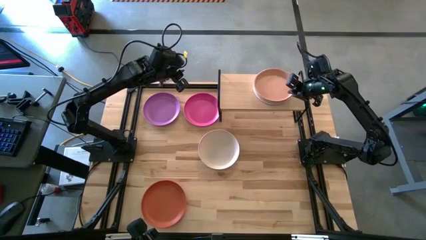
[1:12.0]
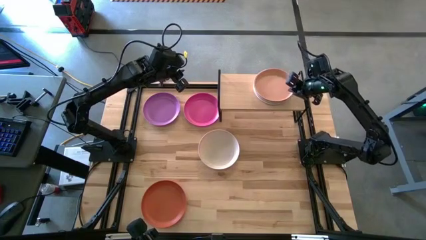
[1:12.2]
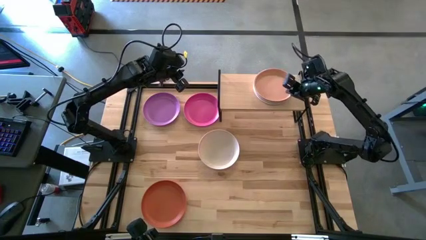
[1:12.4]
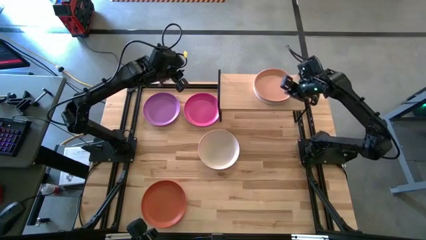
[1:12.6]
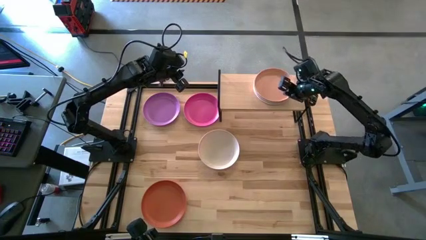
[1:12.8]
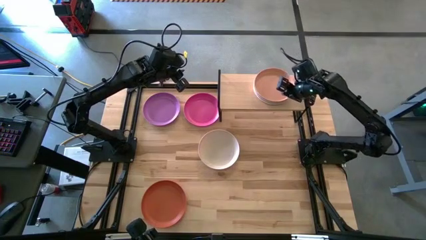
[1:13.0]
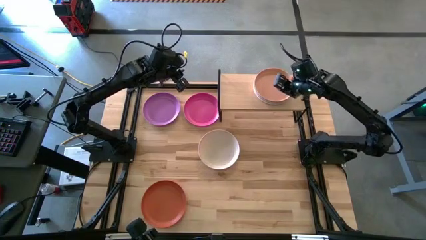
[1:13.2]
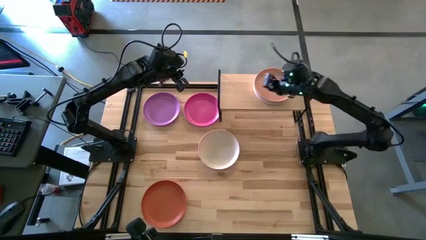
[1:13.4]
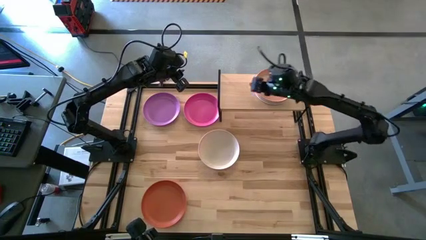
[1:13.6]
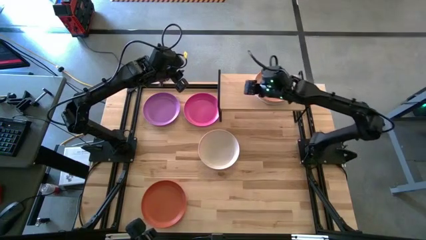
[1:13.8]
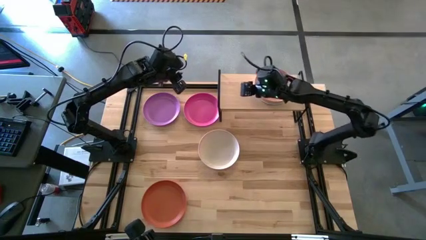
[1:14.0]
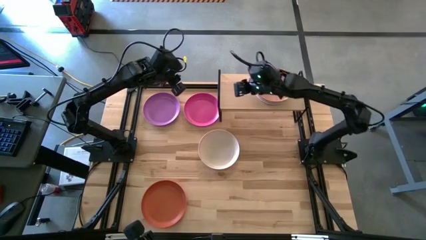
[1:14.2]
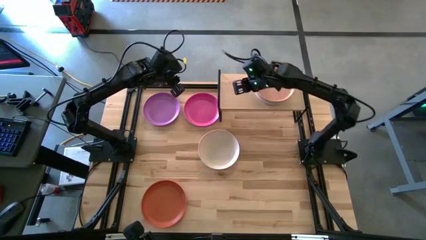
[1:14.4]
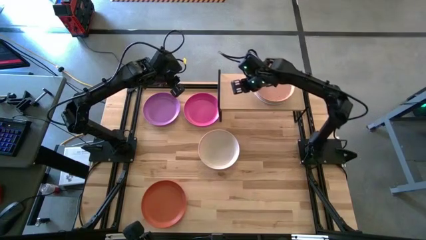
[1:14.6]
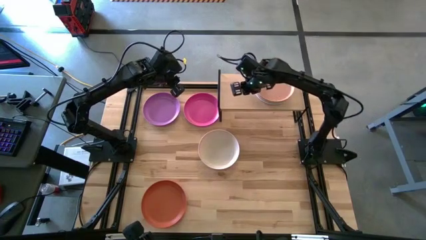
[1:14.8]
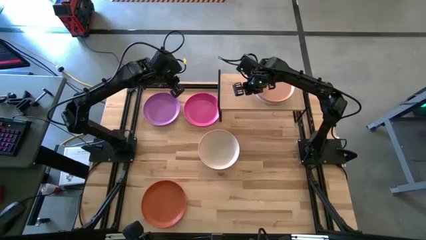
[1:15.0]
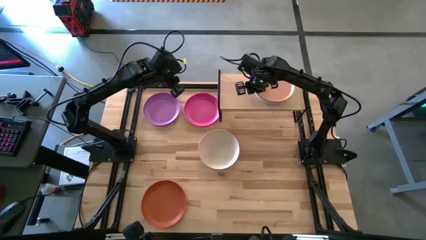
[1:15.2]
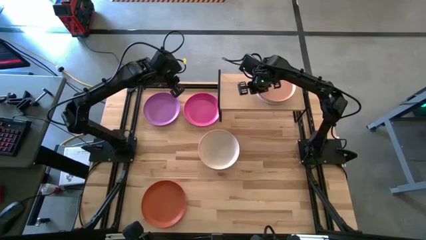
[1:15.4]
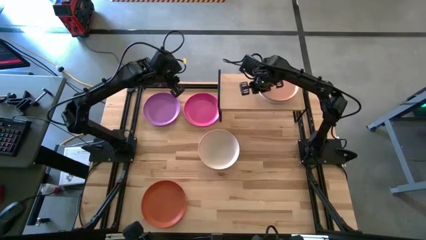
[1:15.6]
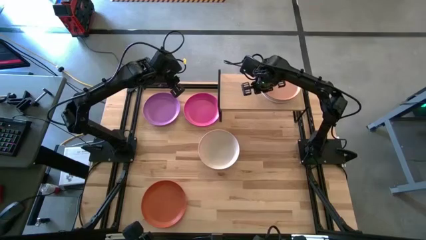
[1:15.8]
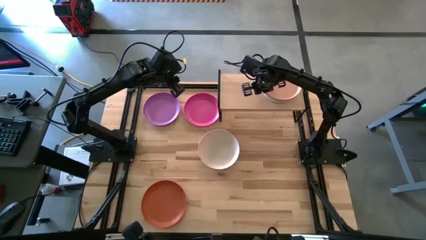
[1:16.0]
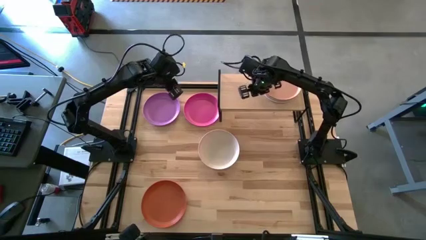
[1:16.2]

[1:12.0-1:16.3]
Task: Place and stack plates onto a shelf
Adjust the plates

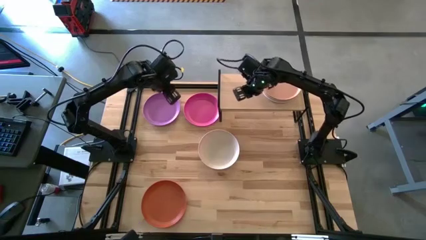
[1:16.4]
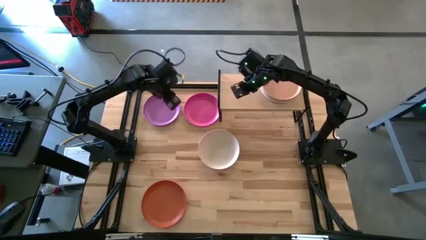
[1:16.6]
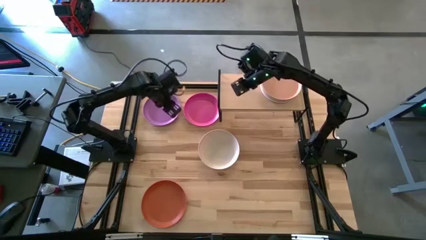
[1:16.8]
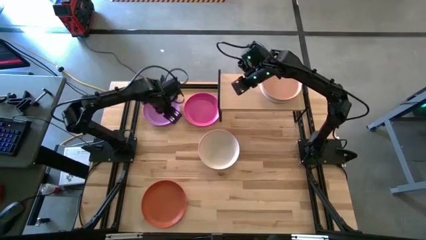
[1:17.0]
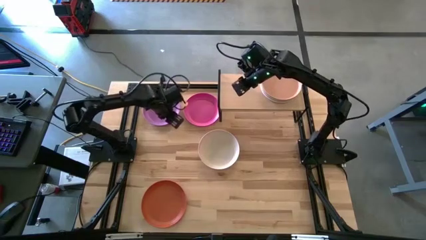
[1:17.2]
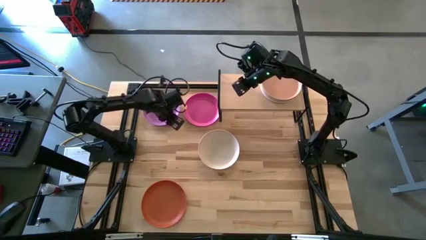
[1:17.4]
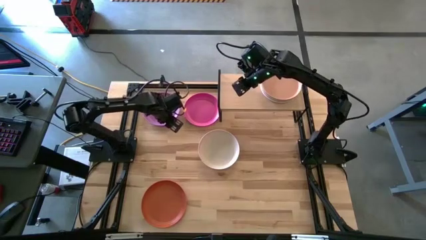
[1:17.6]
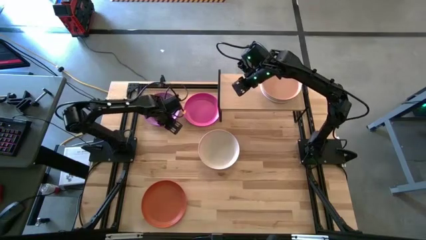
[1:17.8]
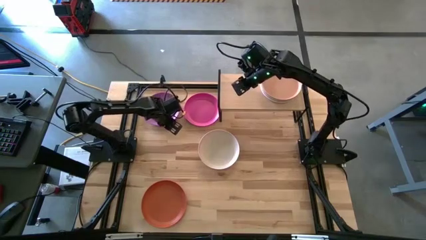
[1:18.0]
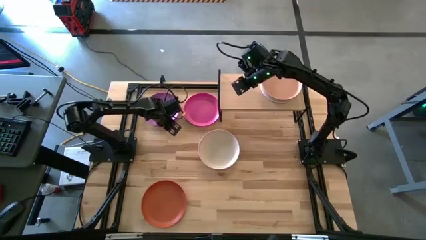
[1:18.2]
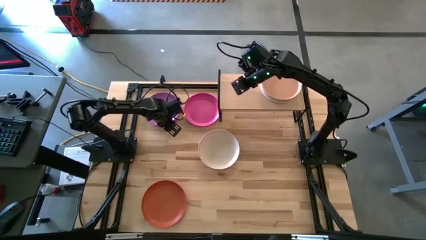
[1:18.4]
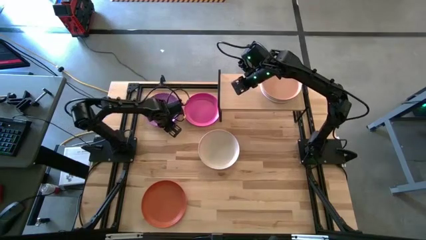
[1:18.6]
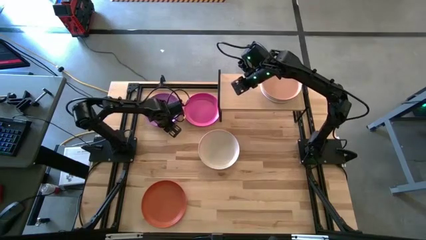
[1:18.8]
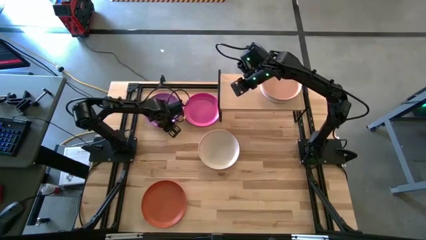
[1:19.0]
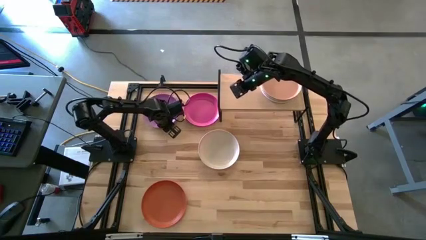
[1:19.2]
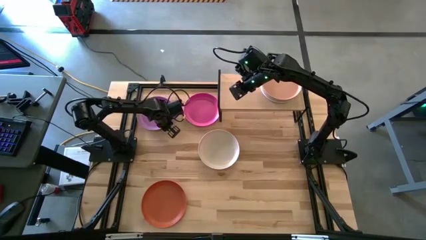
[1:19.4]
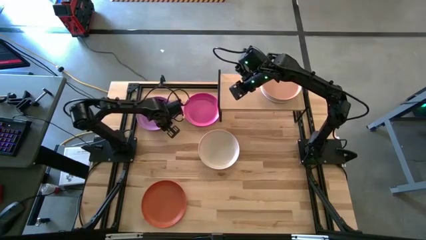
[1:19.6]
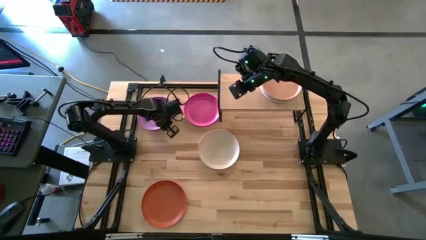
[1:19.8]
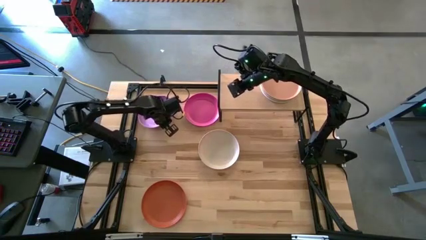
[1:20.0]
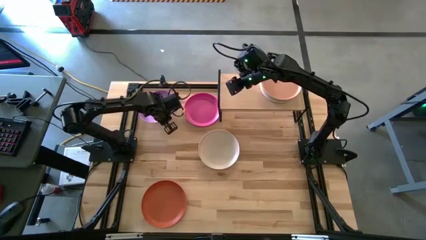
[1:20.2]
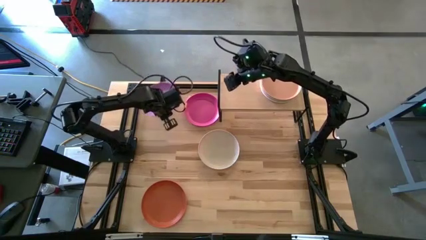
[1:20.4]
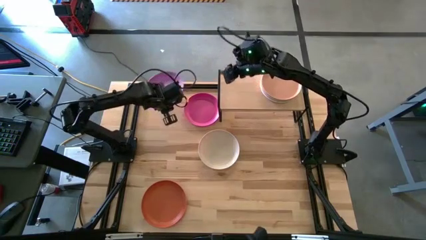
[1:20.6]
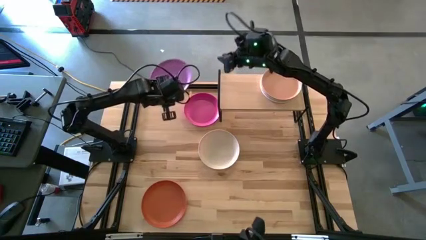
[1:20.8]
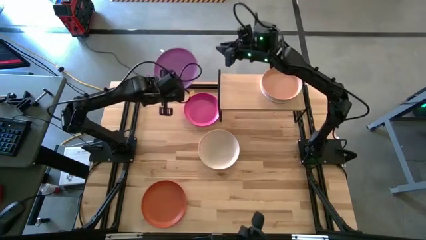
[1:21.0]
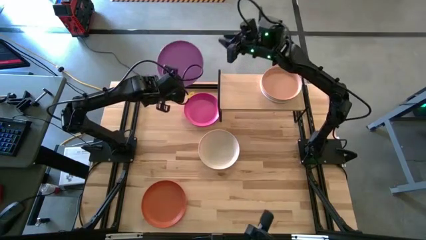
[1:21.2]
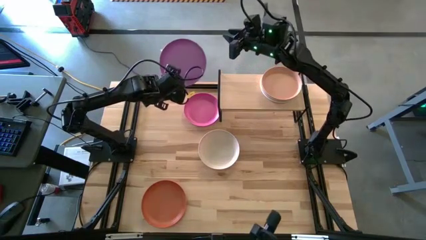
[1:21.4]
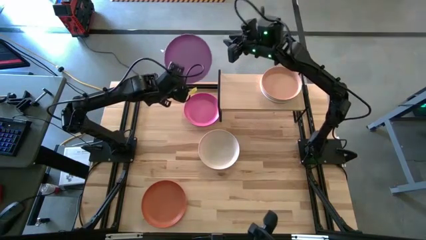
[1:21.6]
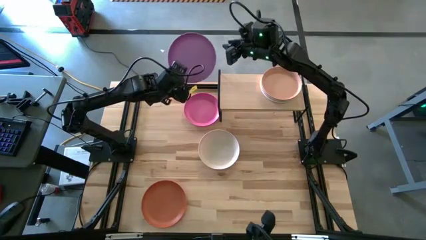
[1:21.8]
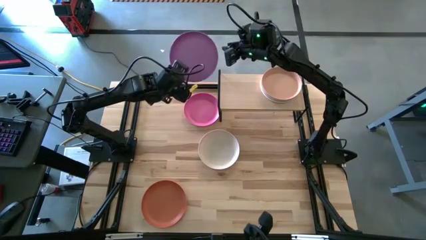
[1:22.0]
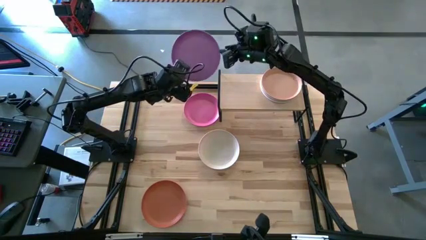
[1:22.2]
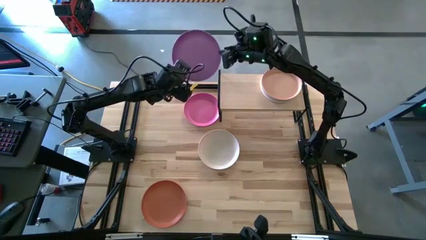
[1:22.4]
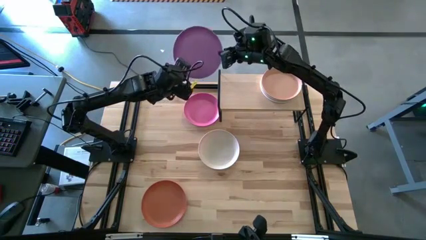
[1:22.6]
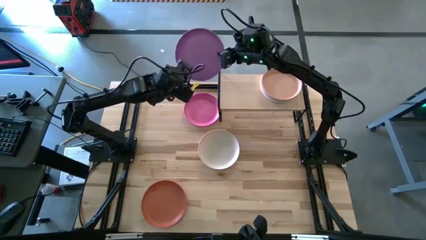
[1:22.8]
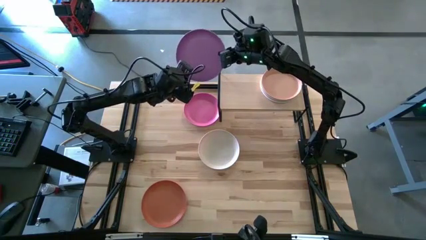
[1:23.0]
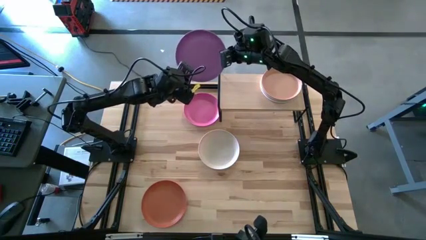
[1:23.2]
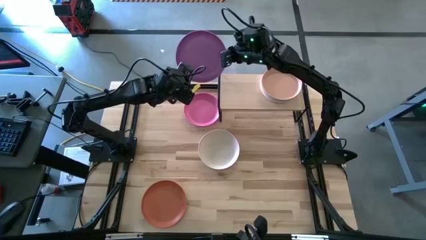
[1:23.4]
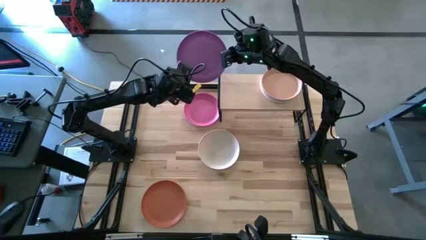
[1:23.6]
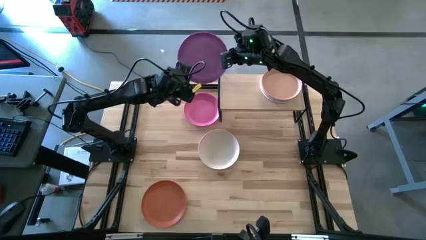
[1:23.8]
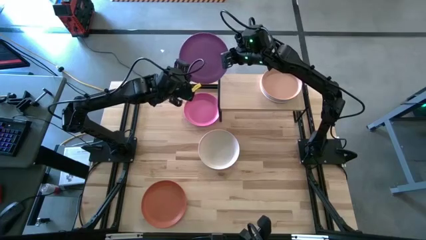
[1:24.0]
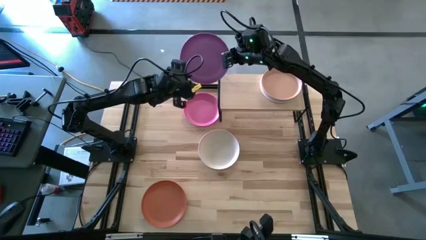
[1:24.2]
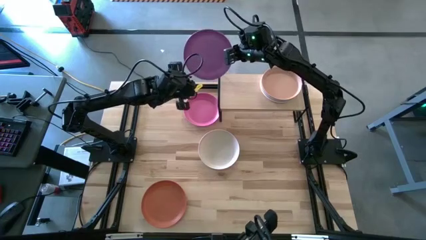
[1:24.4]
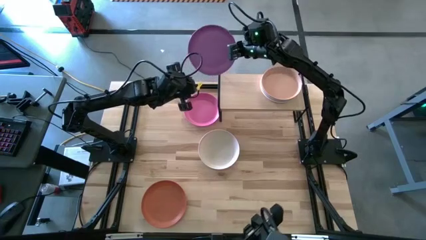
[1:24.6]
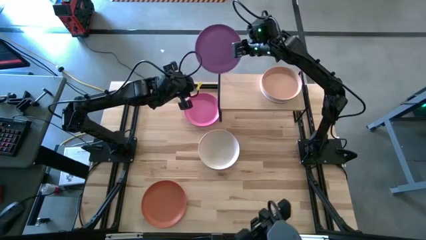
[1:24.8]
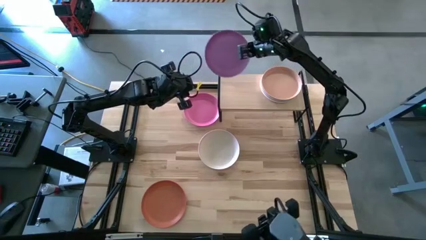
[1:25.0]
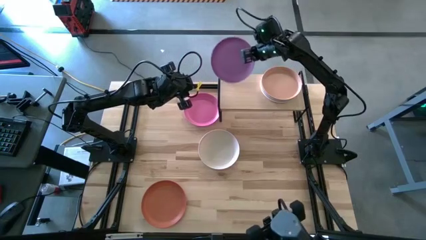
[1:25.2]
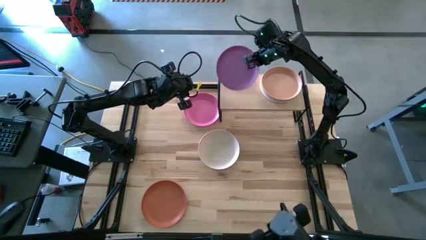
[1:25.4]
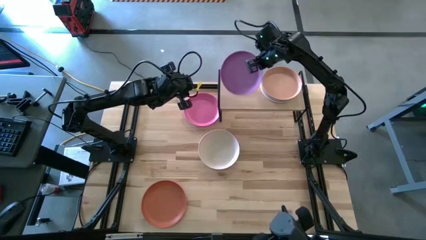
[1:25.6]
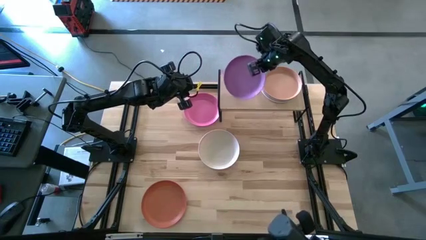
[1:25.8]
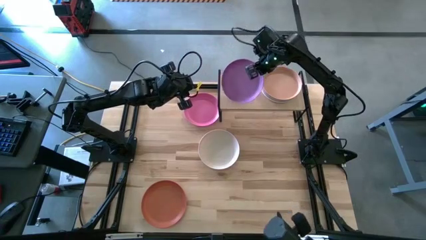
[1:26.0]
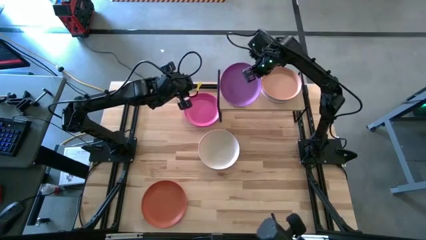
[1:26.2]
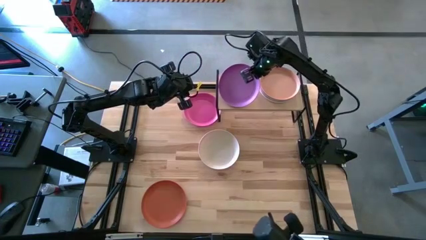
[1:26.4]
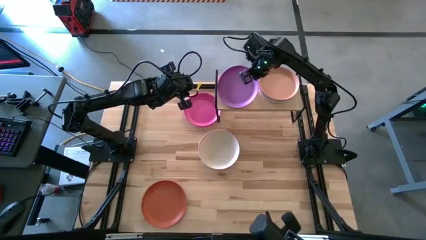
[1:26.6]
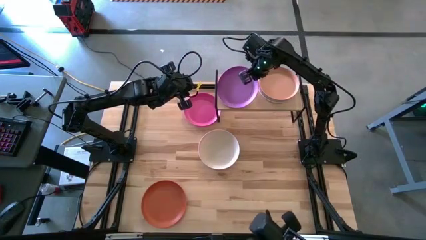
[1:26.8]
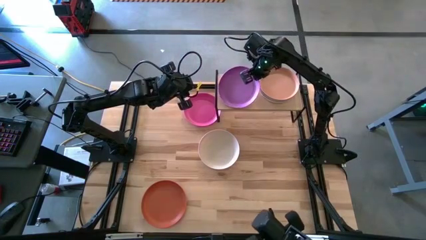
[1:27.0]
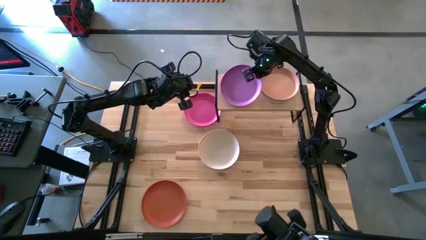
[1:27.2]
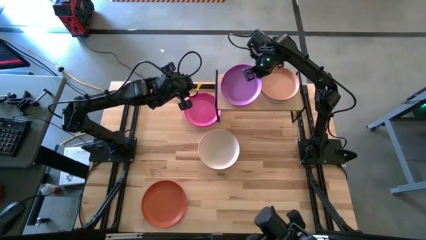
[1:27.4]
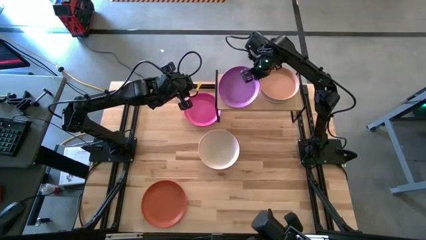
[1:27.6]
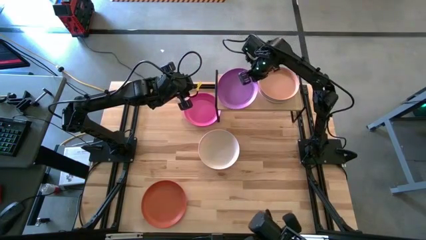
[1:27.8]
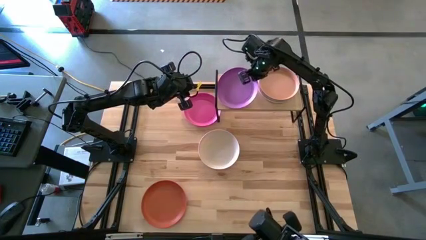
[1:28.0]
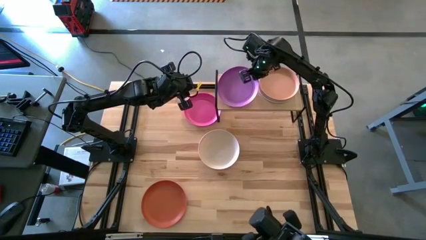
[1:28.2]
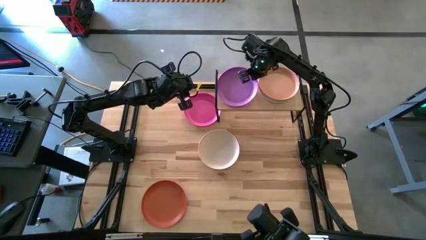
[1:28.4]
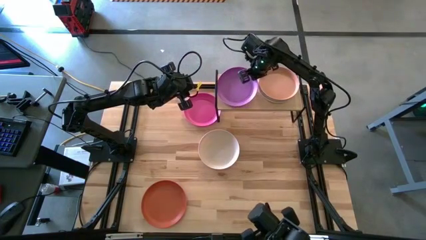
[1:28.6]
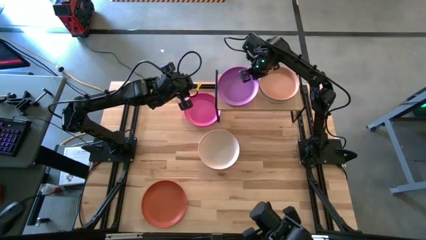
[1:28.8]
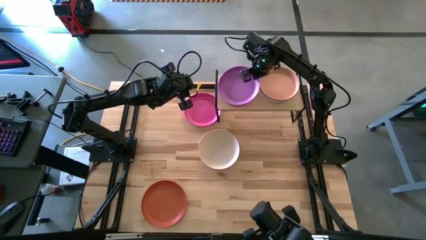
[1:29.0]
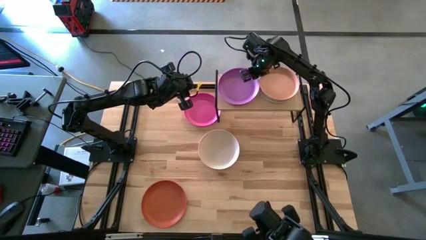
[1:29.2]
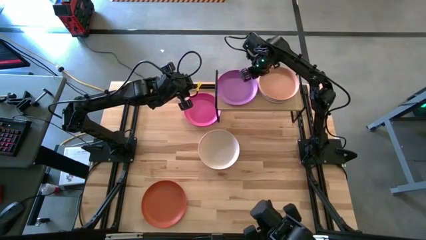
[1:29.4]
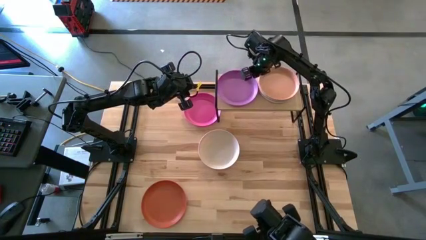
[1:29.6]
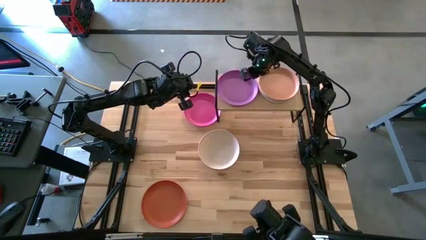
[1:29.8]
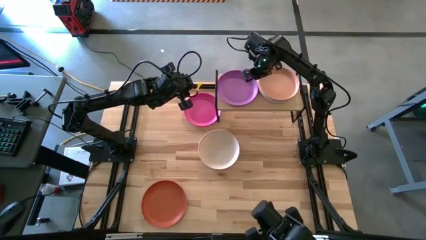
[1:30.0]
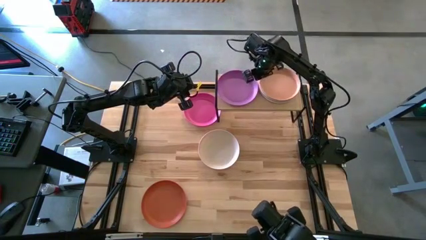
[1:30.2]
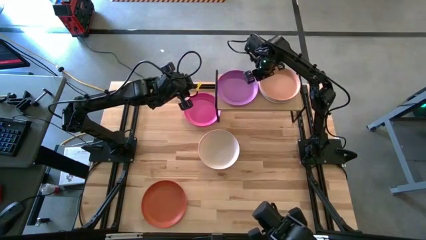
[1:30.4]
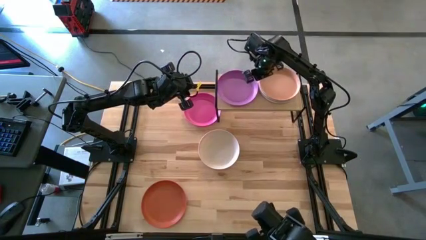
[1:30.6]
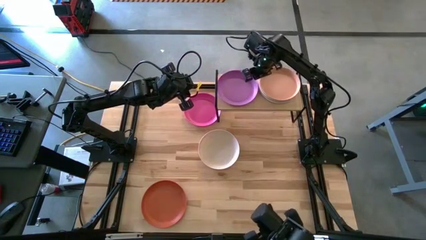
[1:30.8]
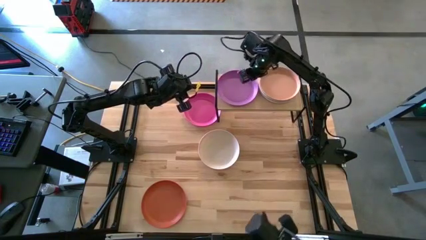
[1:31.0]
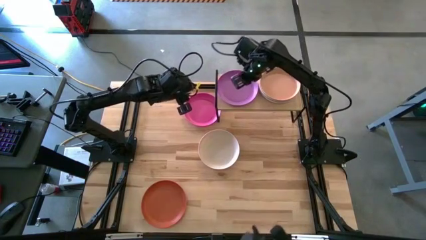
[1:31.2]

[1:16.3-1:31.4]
Put the purple plate on the shelf
